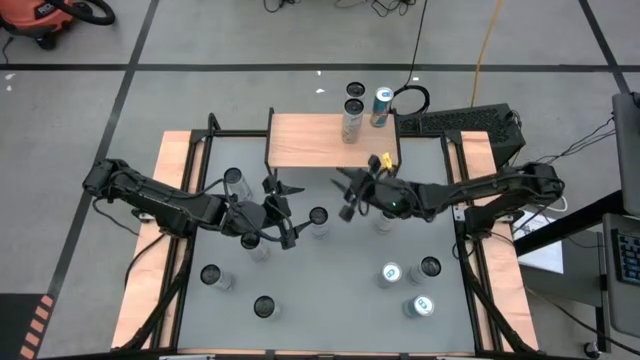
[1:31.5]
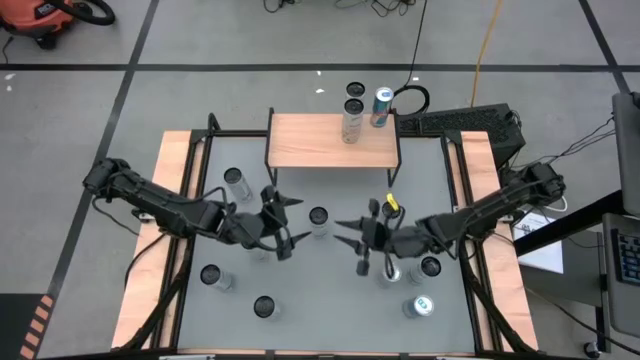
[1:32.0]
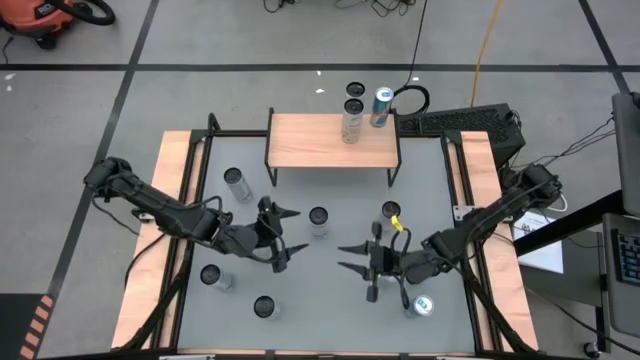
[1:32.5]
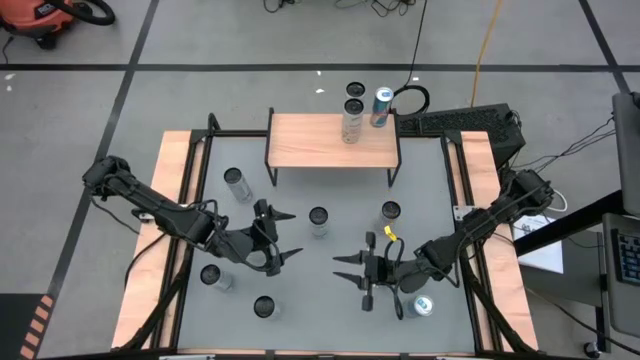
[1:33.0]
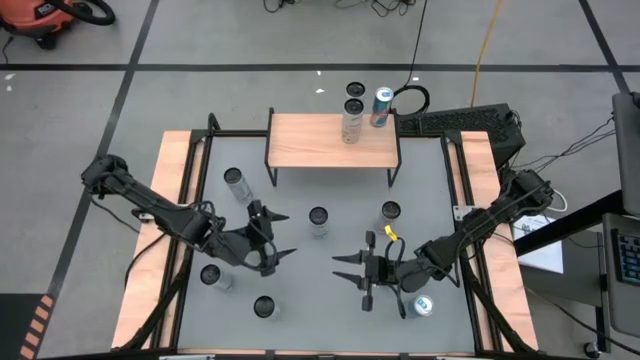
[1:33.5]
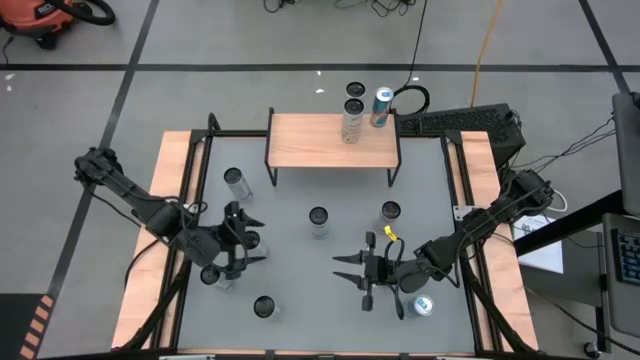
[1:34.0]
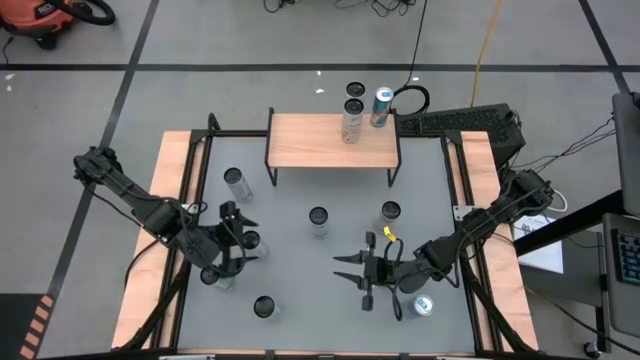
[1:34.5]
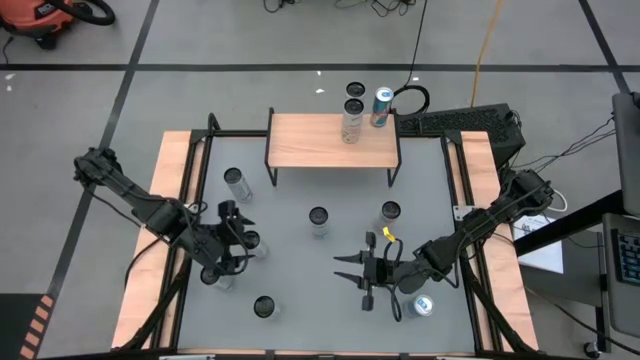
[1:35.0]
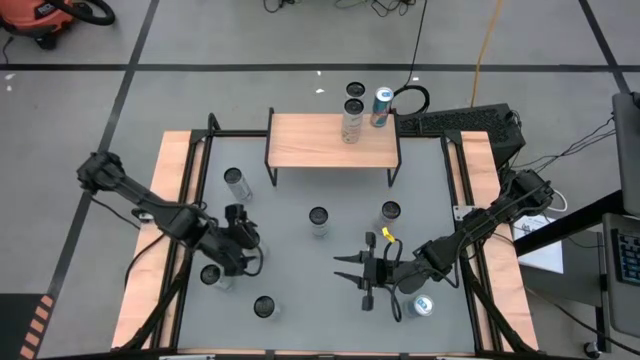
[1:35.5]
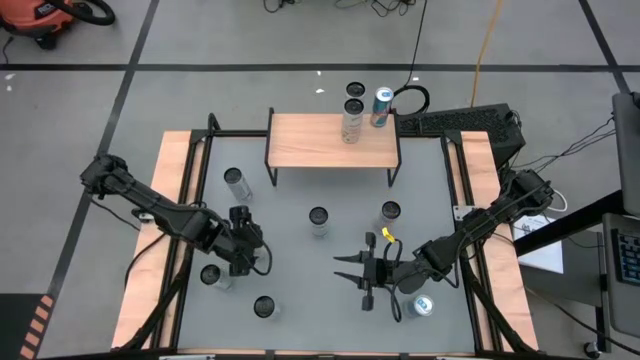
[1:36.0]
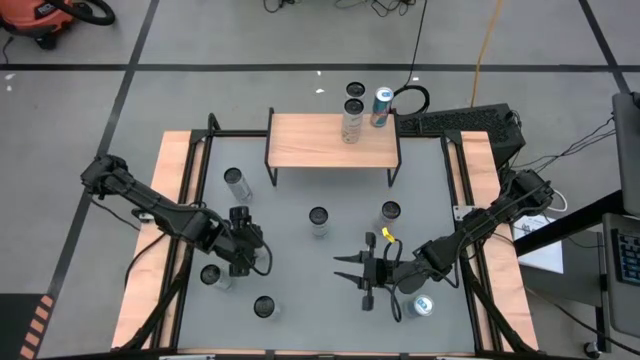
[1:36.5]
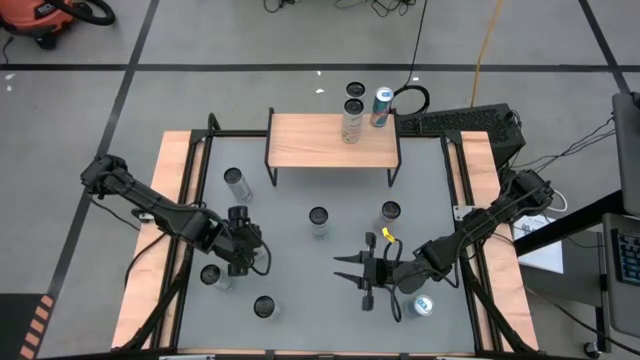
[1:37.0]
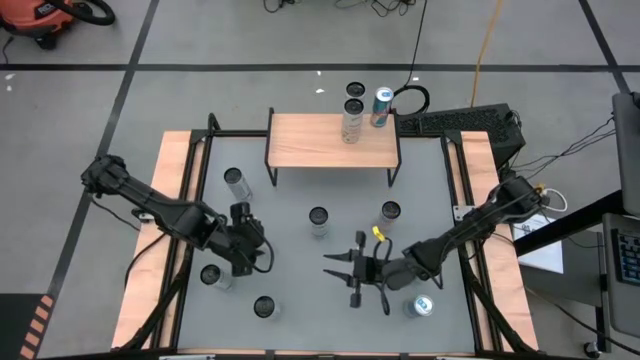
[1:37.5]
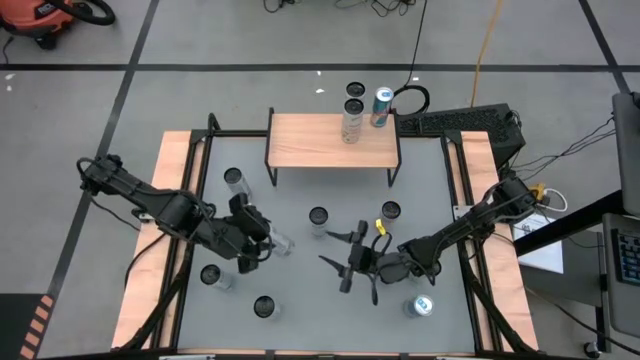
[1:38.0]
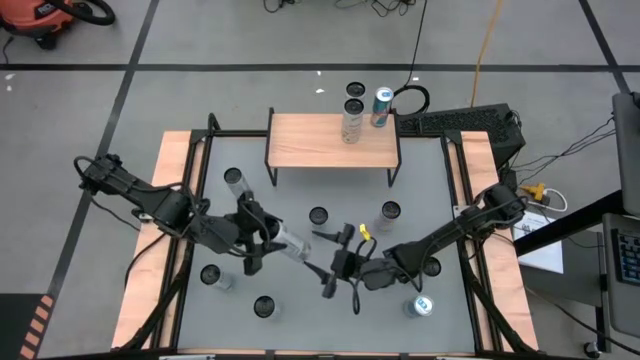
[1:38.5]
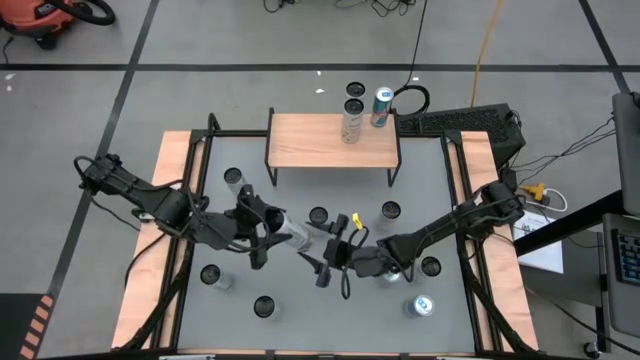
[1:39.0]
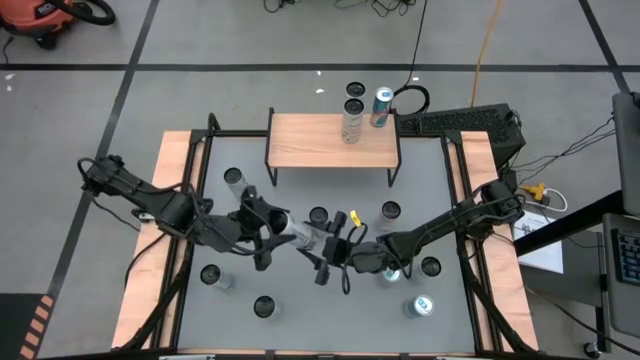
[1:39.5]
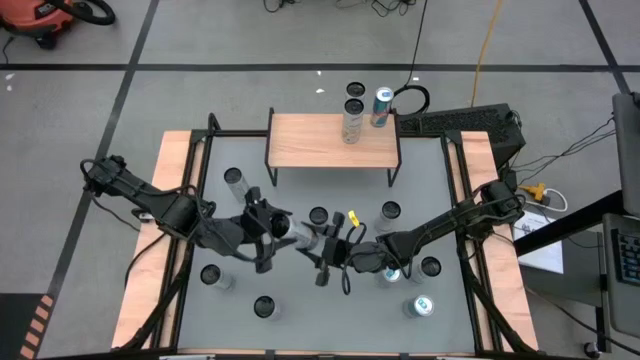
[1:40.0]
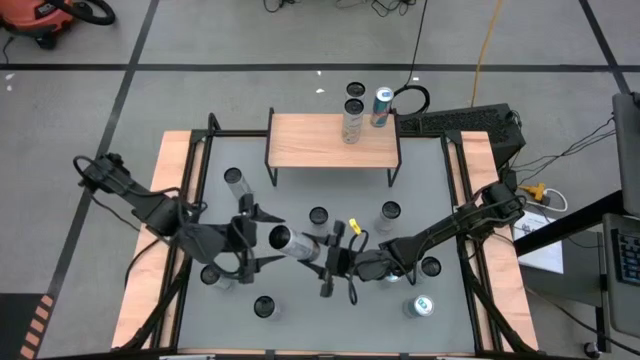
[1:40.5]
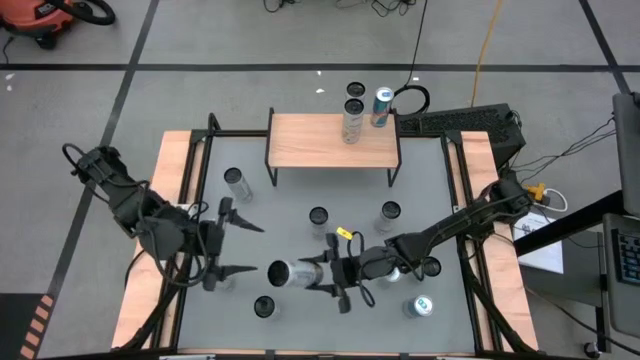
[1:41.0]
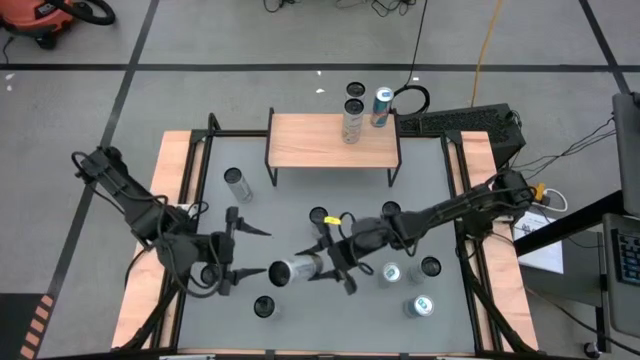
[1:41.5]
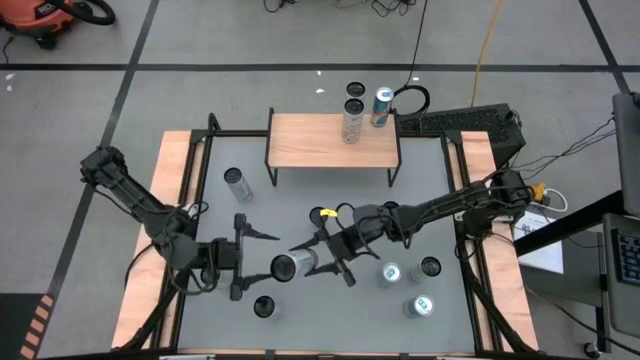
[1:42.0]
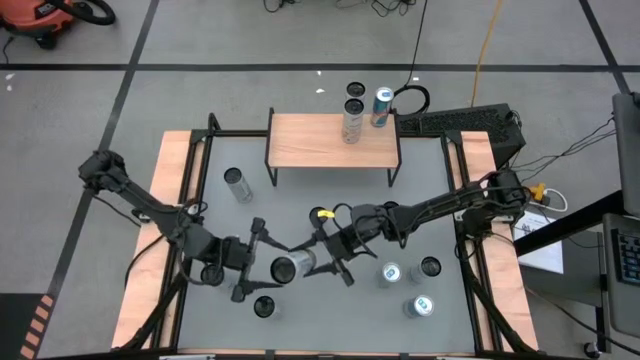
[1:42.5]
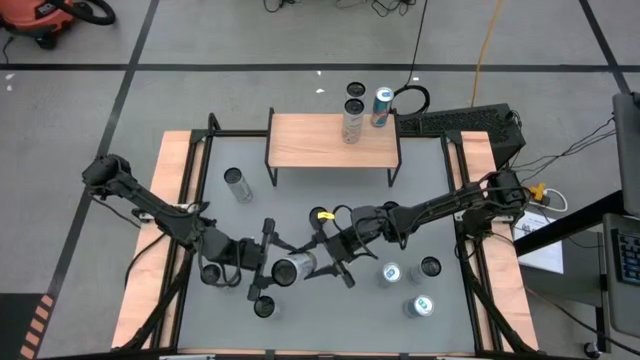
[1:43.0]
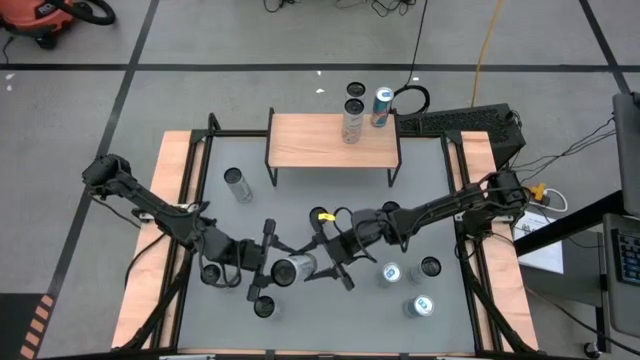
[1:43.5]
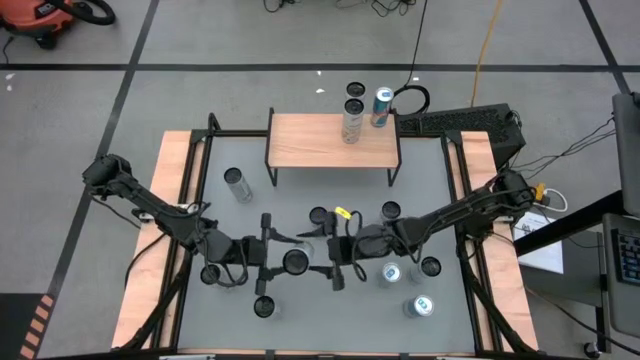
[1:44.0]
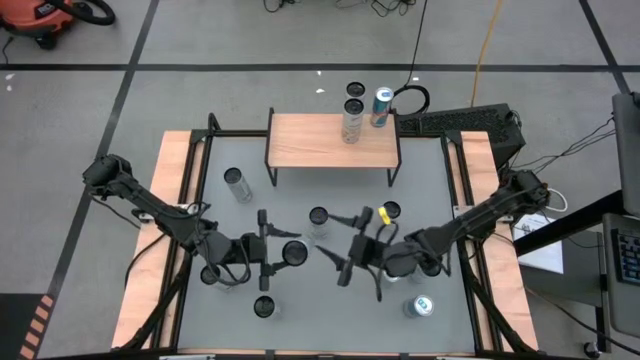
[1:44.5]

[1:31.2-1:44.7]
Task: Place canned beverage on shelf
Put the white yellow soda can on the shelf aligned with the other white yellow soda cans

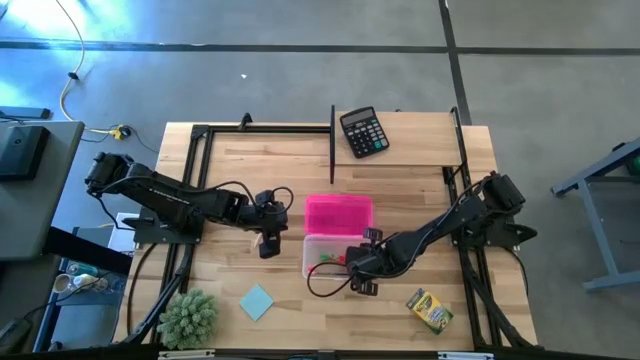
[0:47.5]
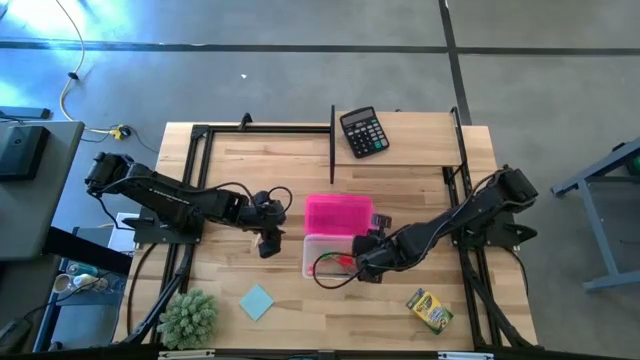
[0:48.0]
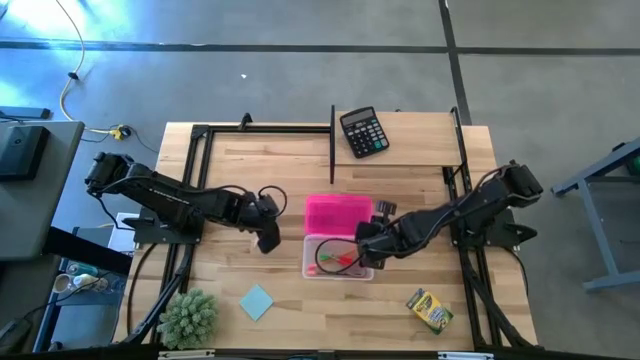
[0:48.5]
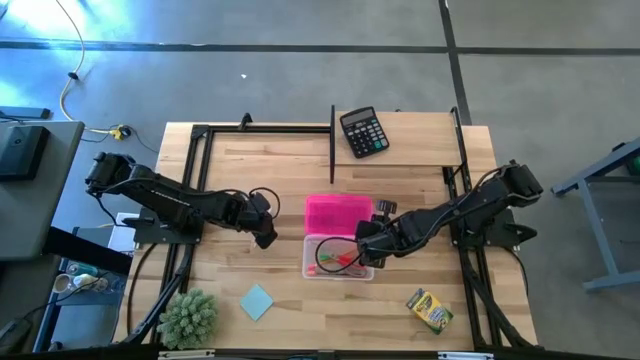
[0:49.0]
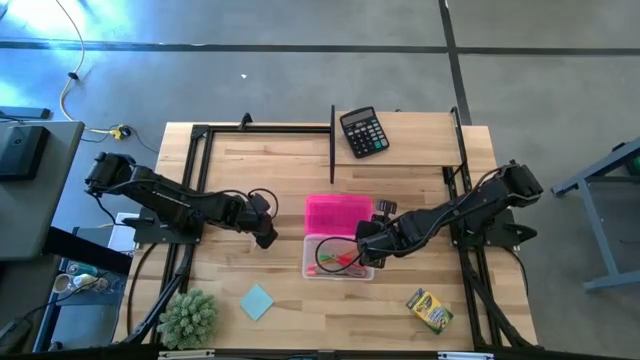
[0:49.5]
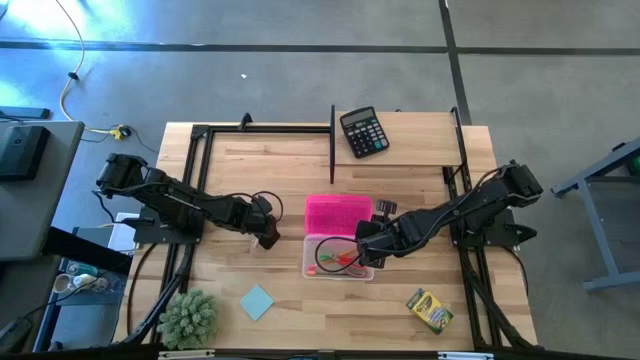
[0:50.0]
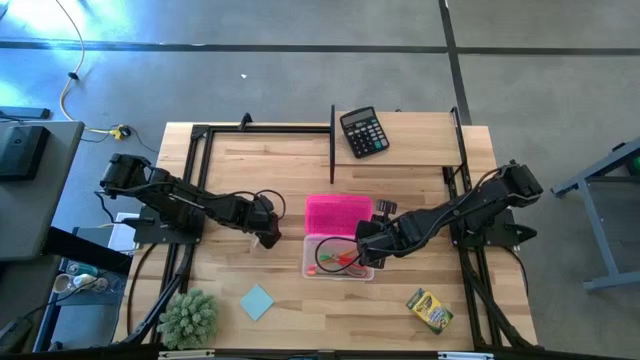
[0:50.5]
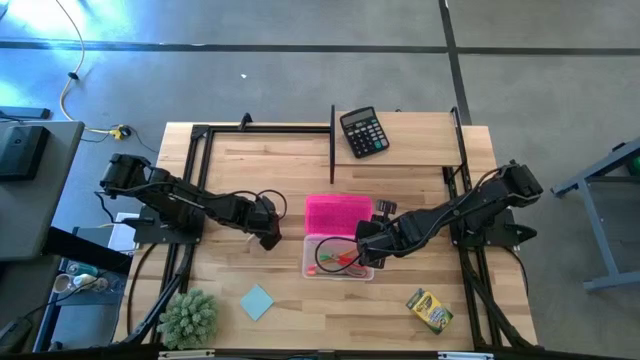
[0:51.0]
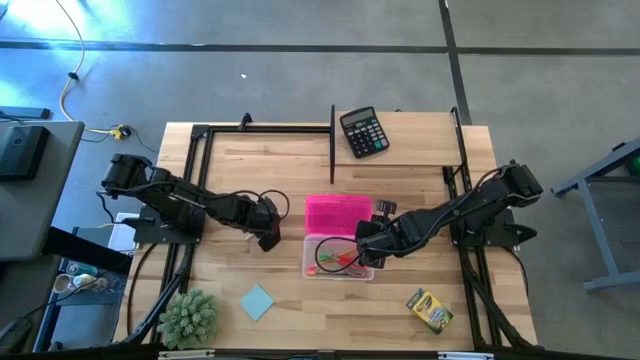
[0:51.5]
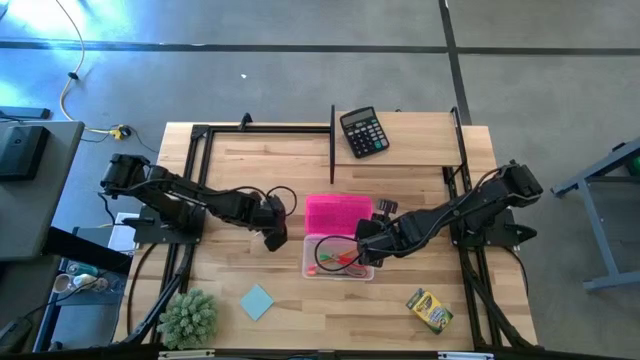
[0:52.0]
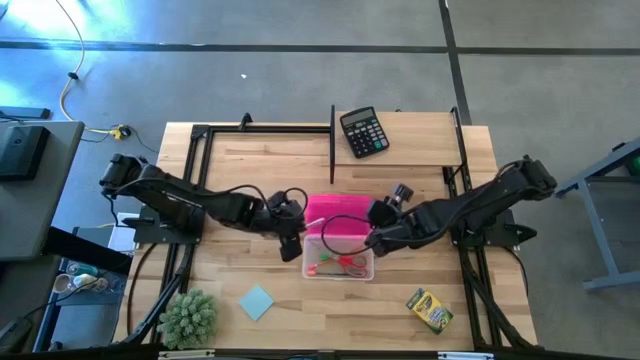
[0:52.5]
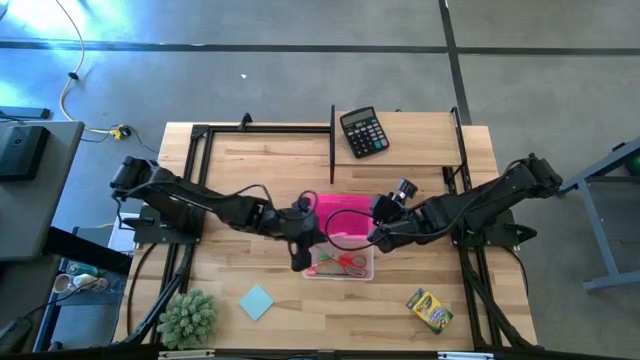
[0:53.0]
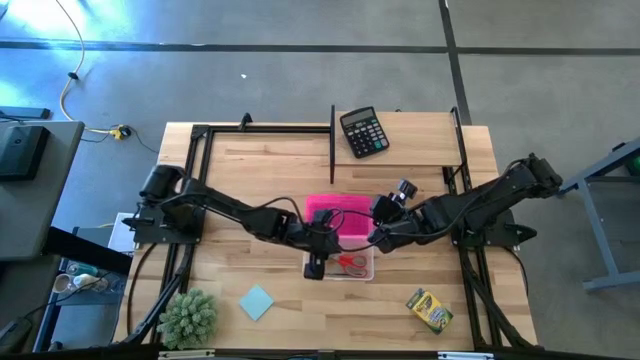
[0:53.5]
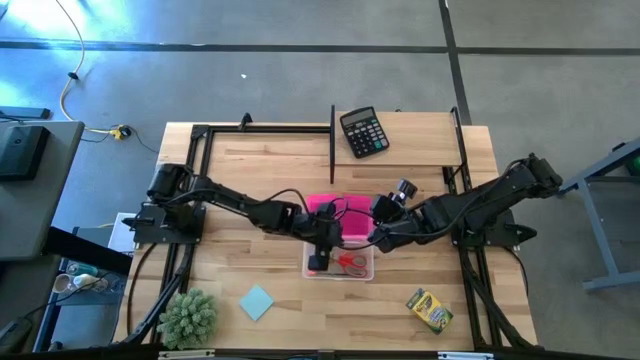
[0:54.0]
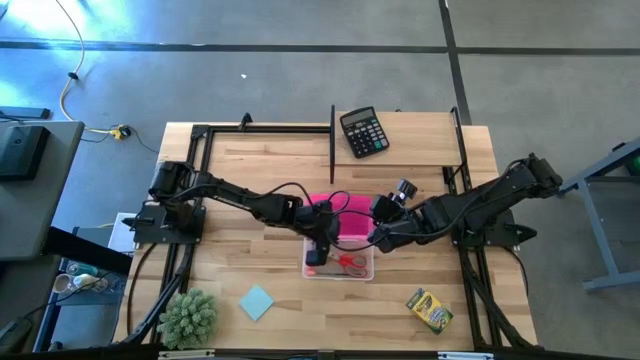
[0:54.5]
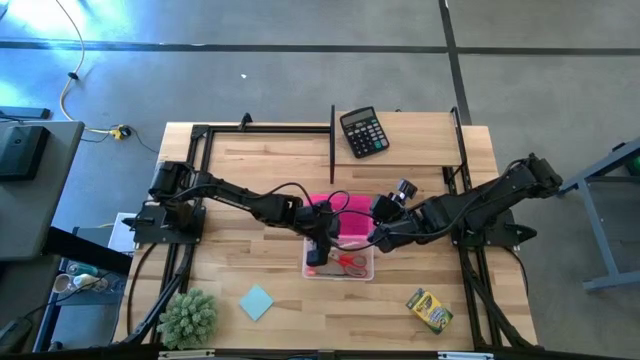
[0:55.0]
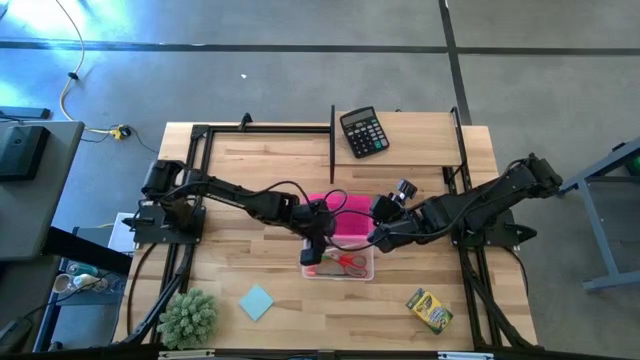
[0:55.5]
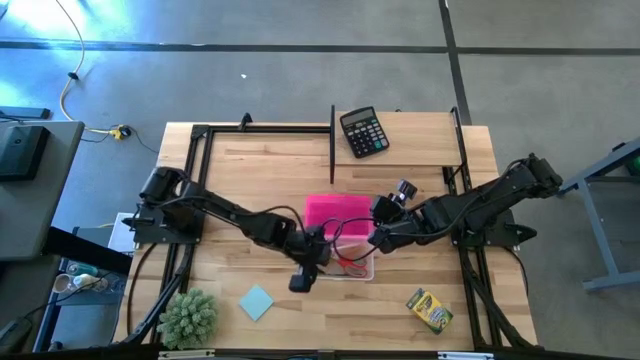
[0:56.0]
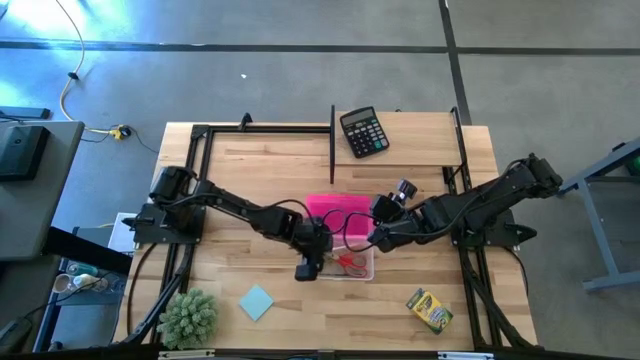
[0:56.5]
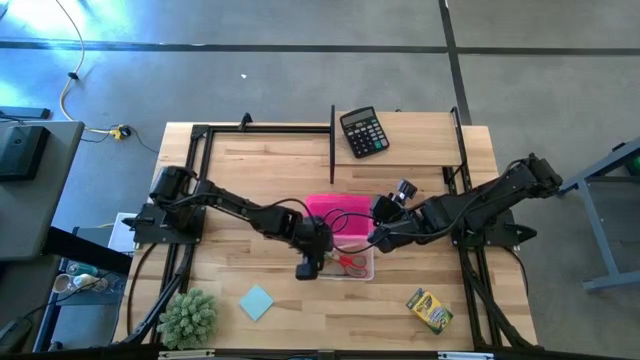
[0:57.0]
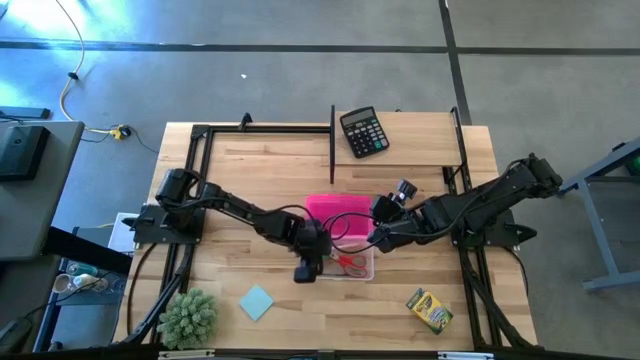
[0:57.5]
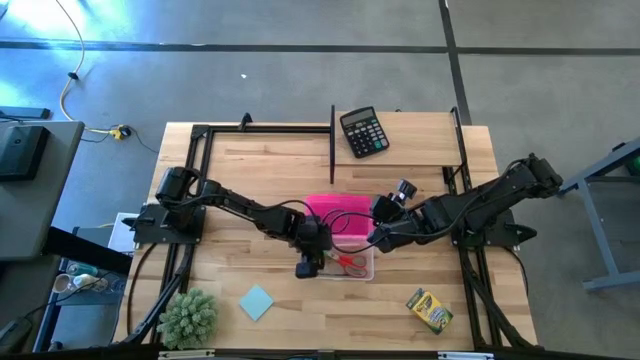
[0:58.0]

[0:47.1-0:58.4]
Task: Pack school essentials
Put the white pen into the supply box
